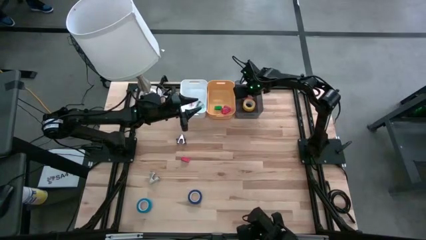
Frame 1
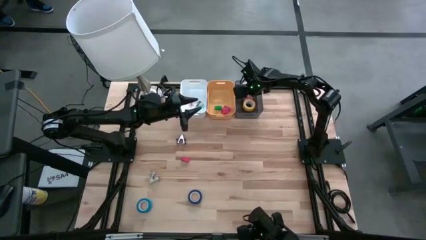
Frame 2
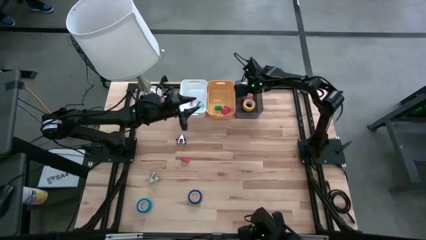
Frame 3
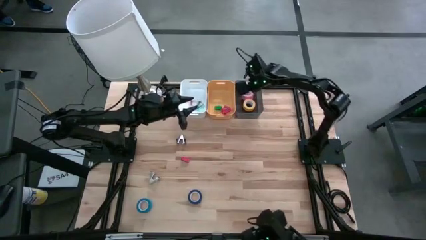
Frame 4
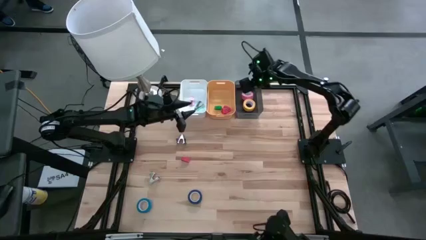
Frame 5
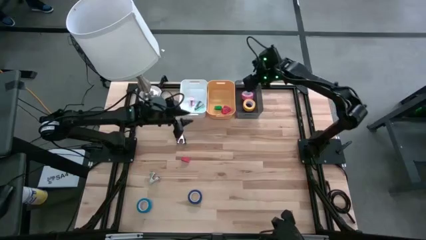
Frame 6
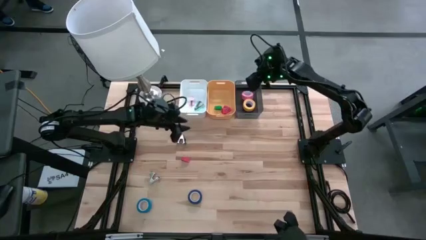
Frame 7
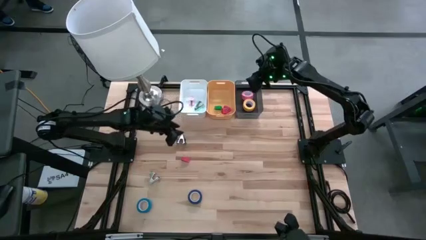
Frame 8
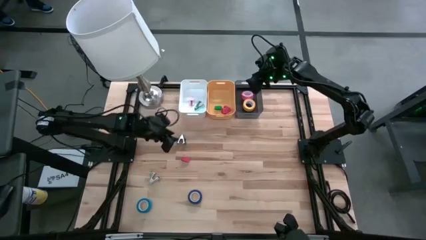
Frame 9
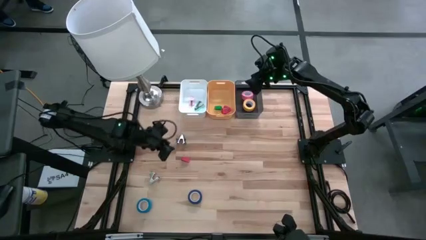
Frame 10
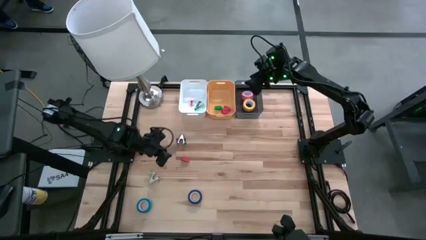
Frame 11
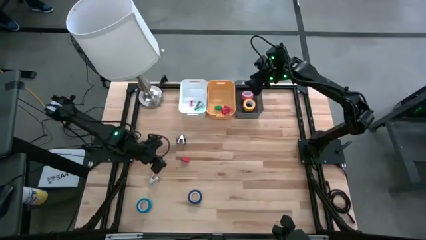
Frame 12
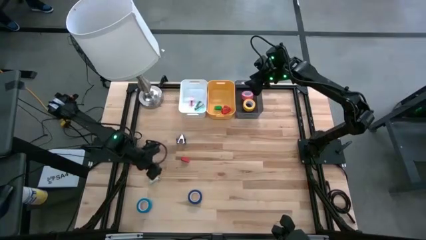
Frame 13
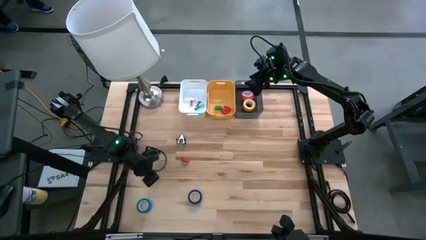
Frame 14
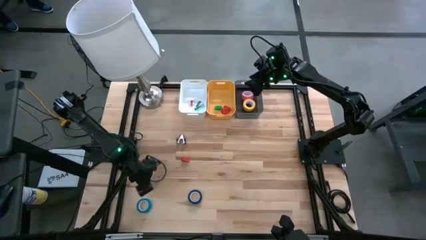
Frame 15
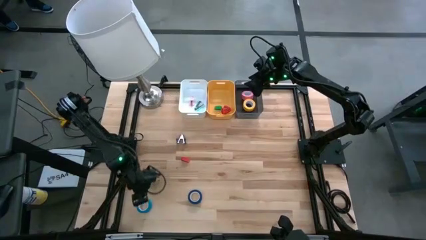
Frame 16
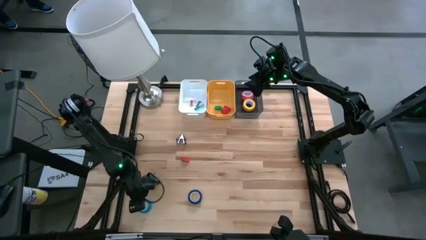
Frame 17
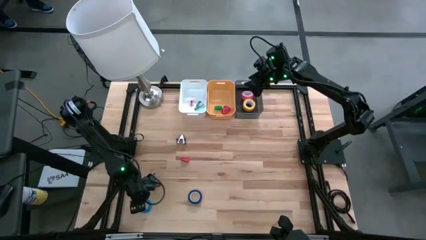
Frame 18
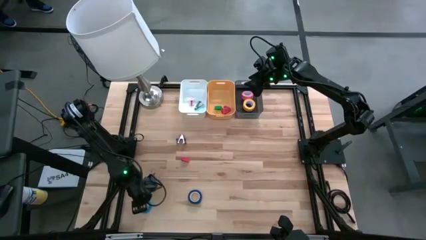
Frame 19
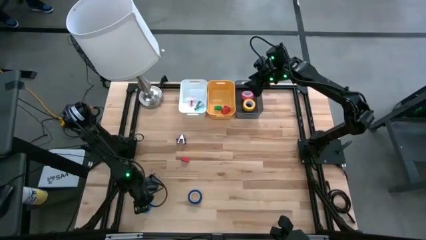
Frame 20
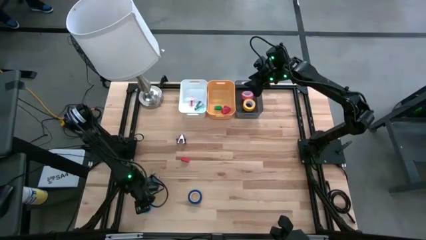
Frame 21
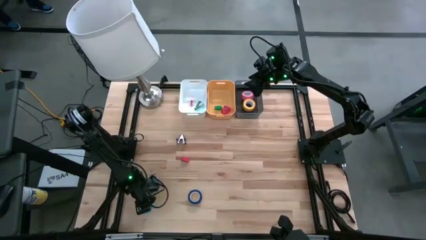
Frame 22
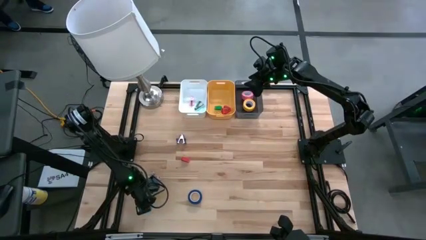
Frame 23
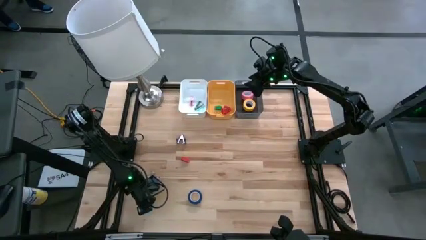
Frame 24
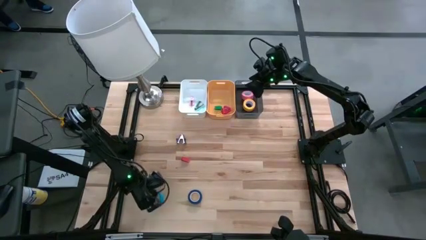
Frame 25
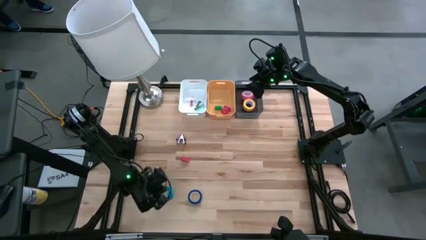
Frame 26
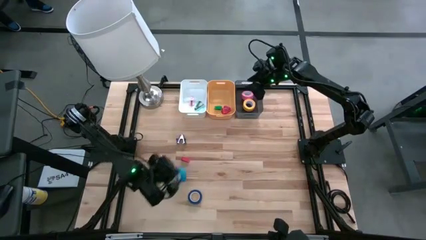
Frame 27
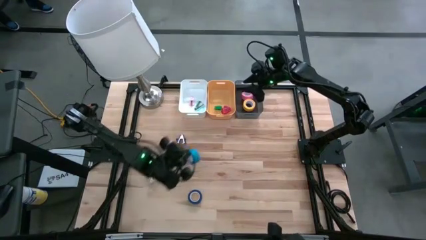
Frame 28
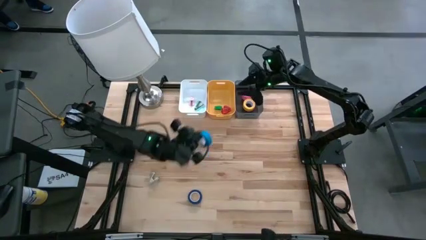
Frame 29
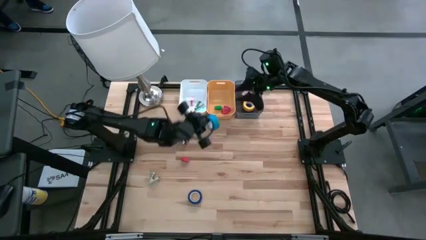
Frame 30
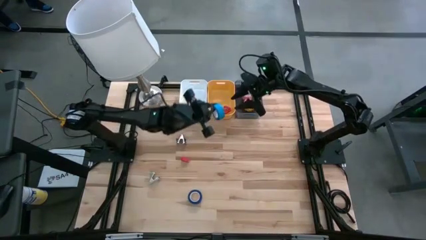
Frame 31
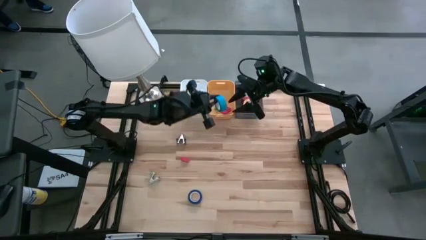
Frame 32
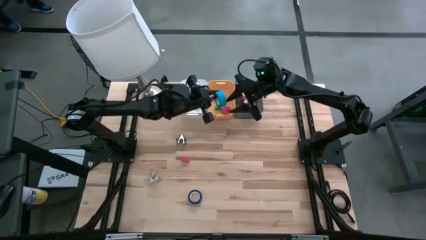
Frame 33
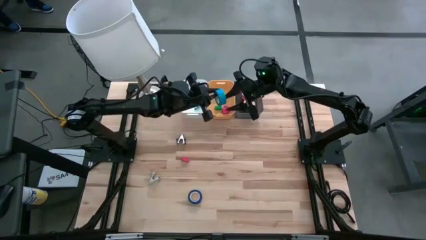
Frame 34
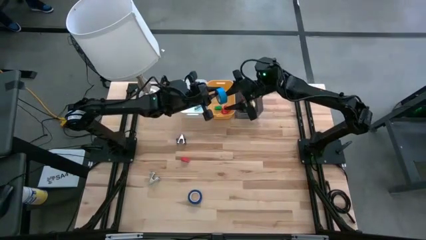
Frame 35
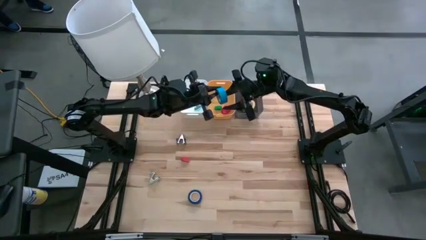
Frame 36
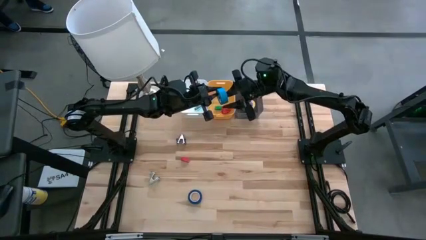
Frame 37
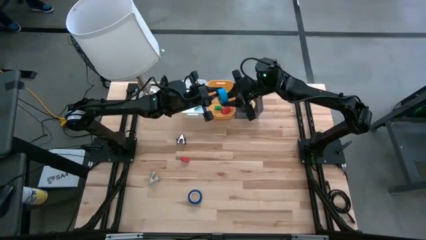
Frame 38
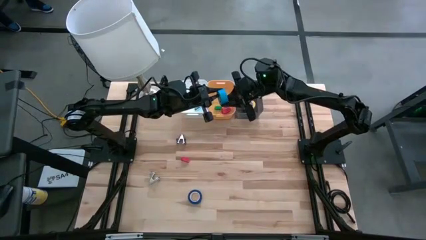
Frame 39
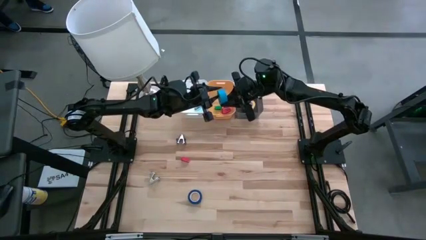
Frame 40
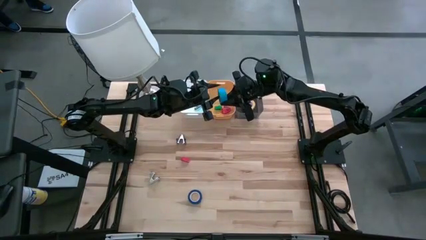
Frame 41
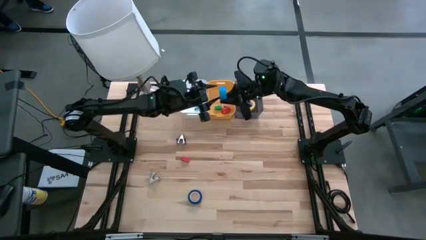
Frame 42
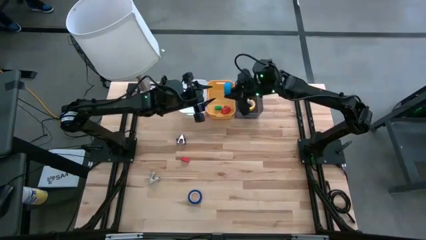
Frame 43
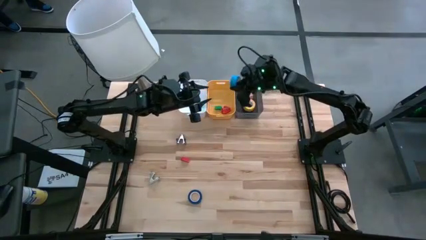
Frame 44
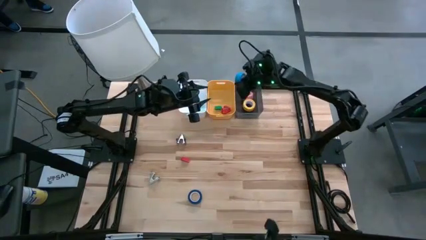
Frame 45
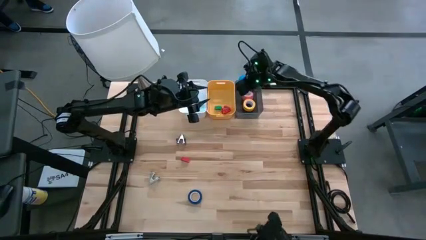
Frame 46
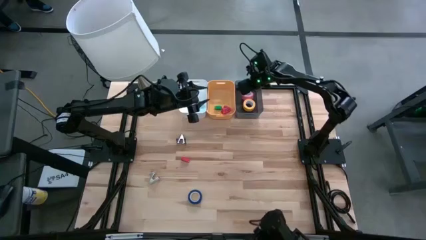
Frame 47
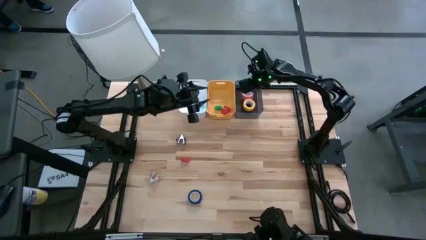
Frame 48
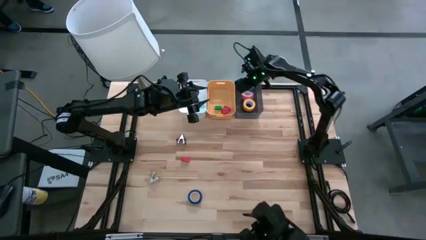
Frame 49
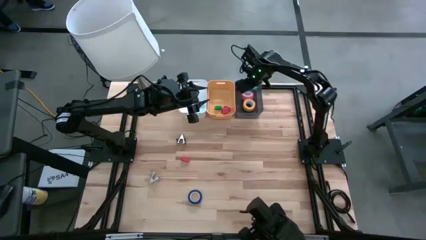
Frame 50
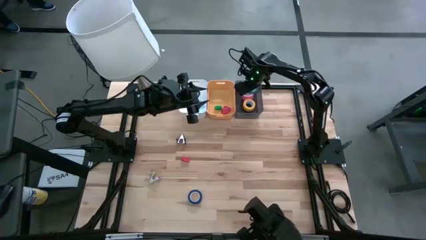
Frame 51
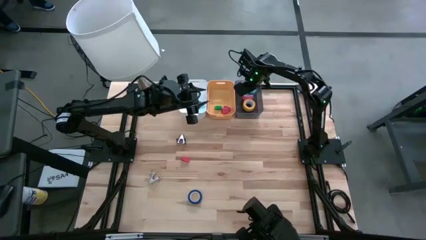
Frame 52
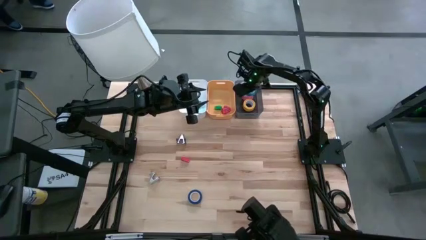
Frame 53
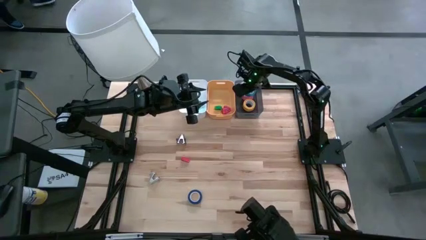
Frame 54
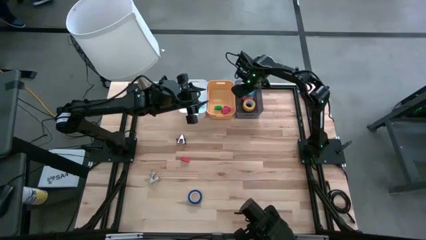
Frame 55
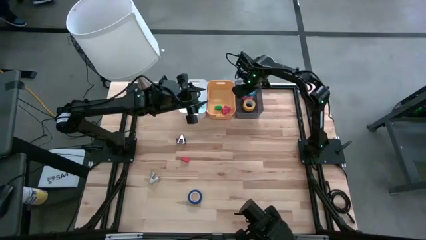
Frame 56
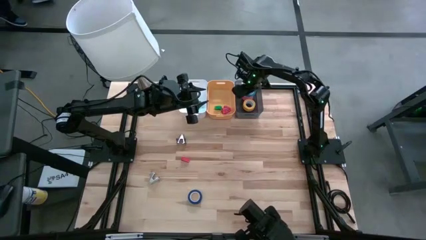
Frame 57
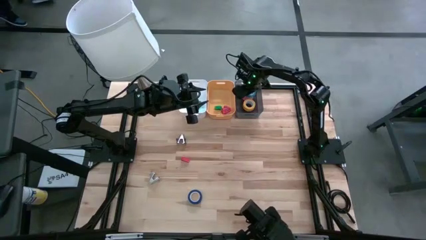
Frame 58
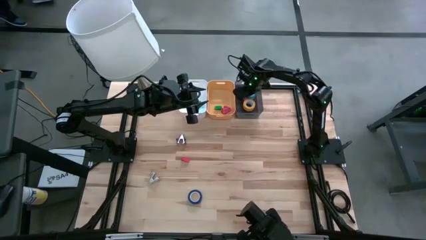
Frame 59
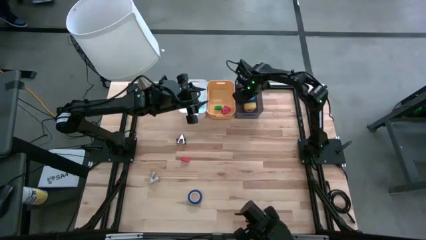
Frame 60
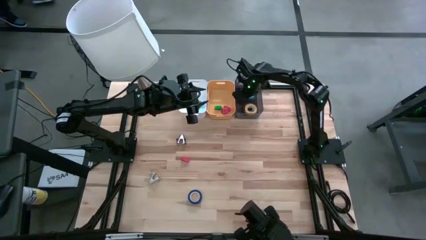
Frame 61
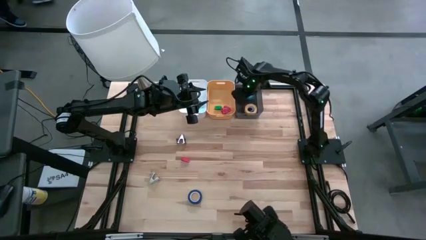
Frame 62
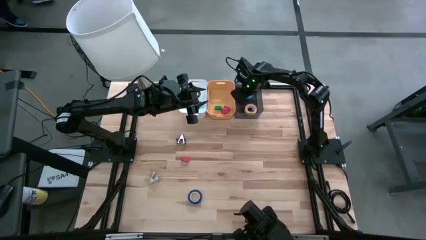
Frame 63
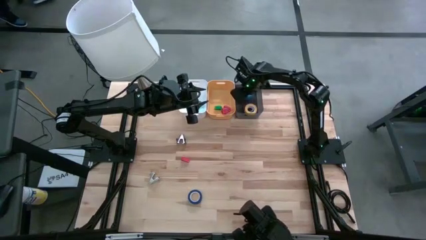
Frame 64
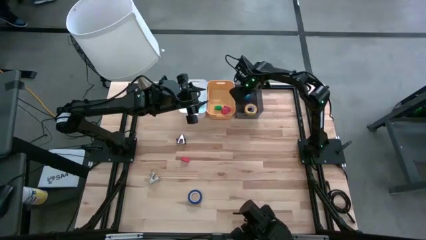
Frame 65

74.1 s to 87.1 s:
Task: Pick and place Stapler, Stapler remover, tape
Put the light blue tape into the black bin
